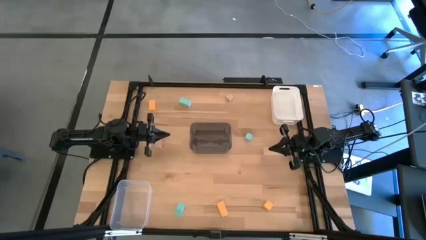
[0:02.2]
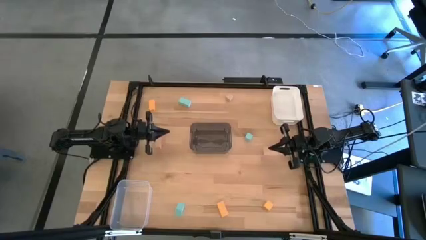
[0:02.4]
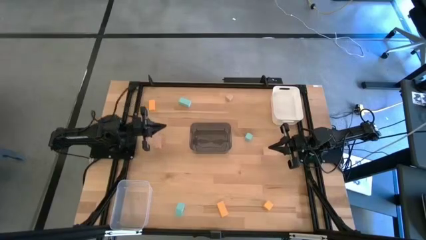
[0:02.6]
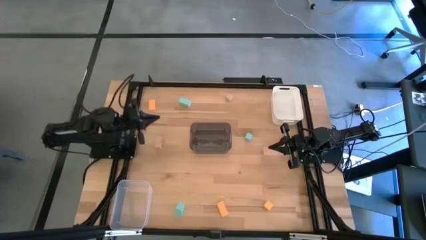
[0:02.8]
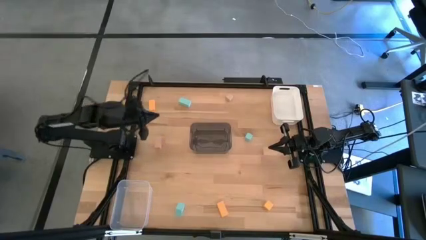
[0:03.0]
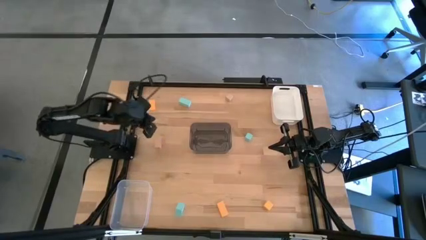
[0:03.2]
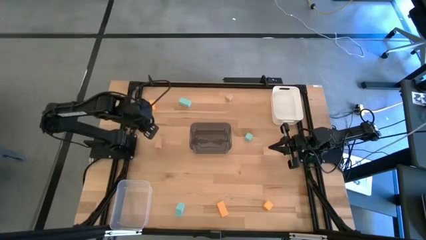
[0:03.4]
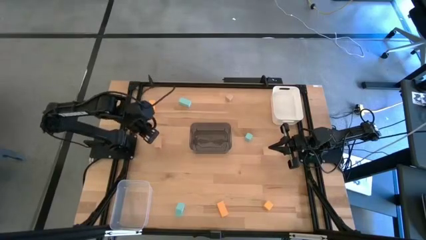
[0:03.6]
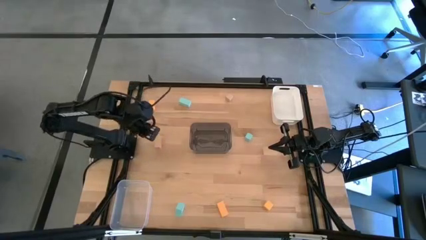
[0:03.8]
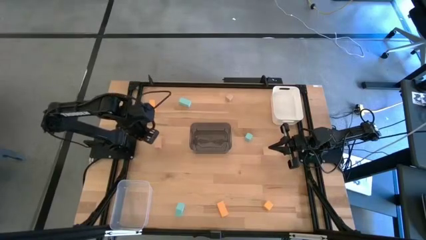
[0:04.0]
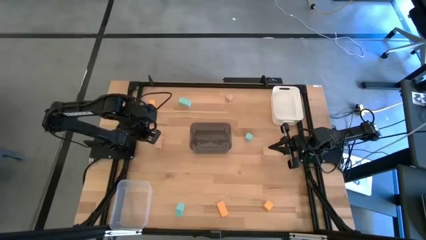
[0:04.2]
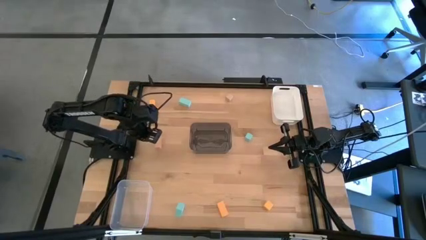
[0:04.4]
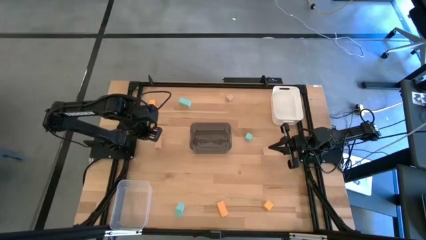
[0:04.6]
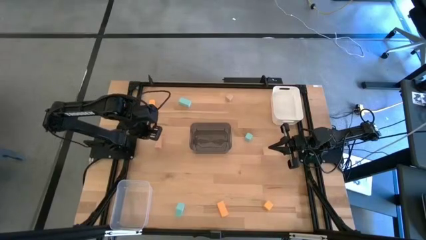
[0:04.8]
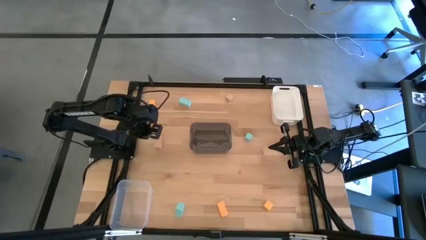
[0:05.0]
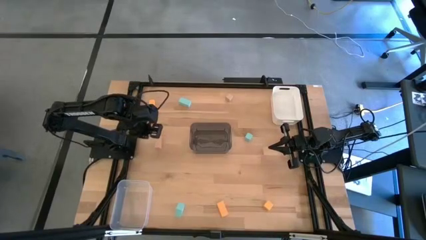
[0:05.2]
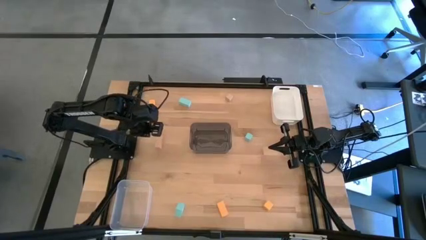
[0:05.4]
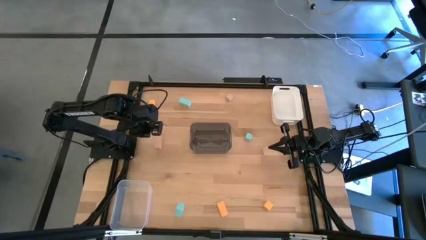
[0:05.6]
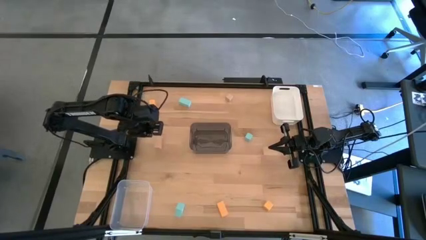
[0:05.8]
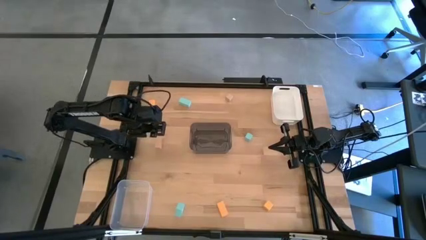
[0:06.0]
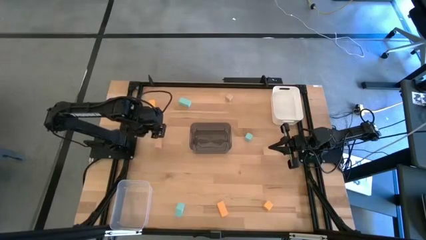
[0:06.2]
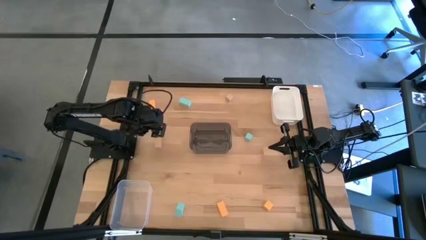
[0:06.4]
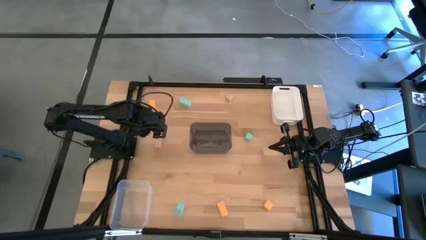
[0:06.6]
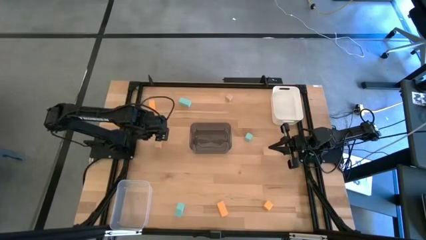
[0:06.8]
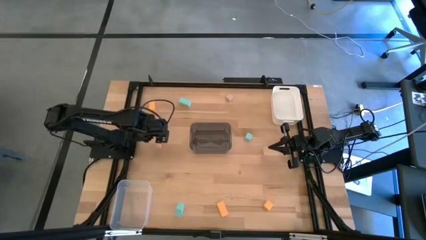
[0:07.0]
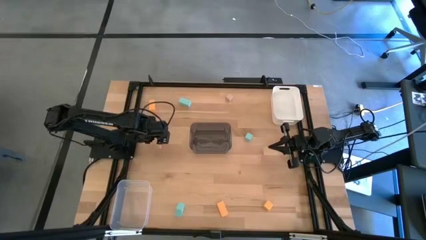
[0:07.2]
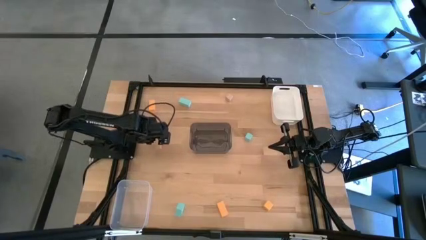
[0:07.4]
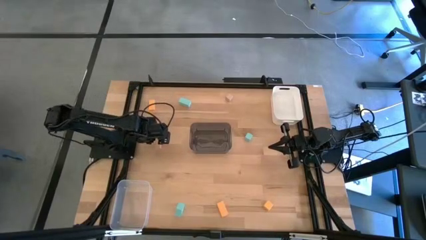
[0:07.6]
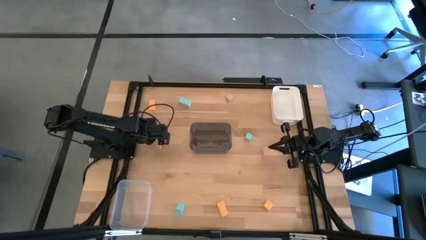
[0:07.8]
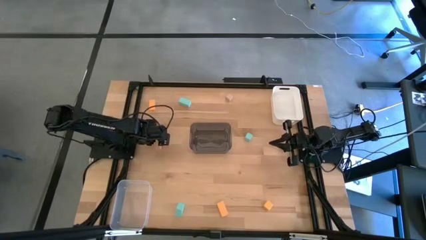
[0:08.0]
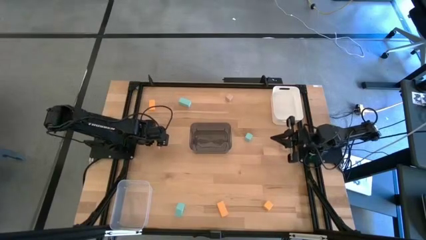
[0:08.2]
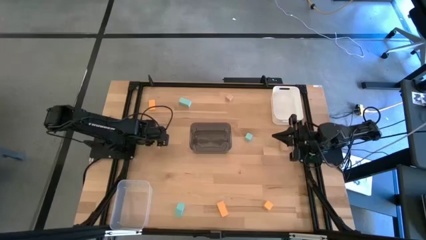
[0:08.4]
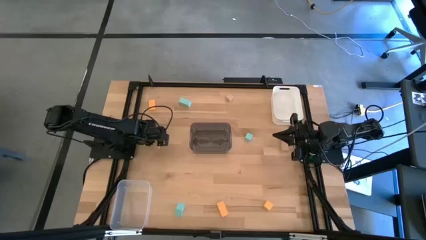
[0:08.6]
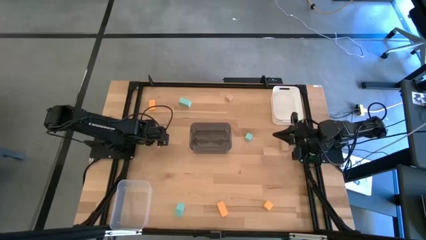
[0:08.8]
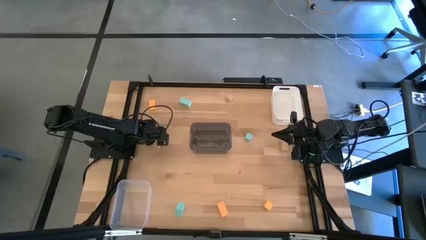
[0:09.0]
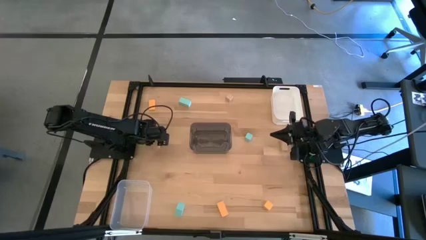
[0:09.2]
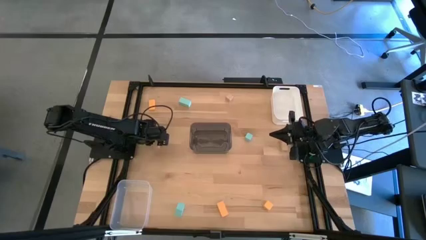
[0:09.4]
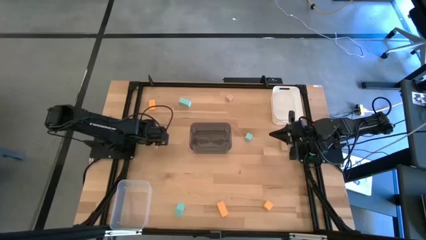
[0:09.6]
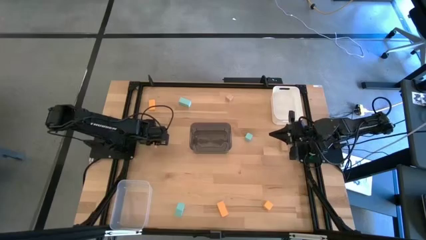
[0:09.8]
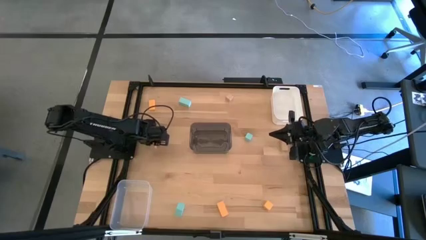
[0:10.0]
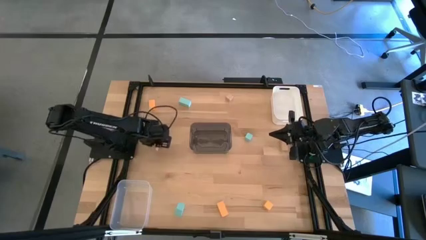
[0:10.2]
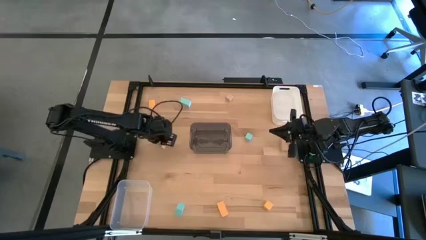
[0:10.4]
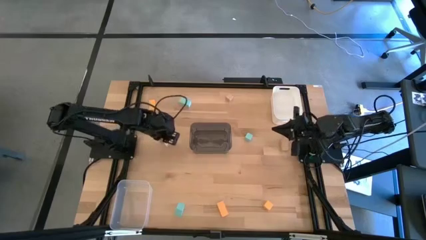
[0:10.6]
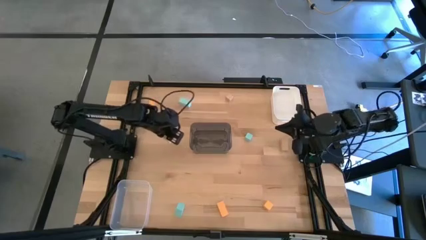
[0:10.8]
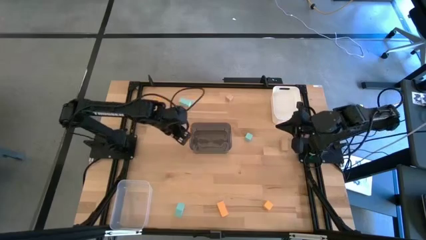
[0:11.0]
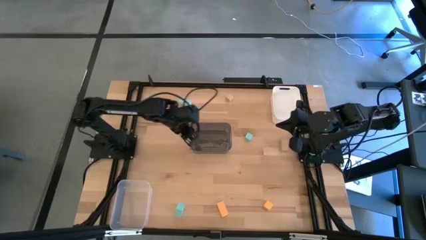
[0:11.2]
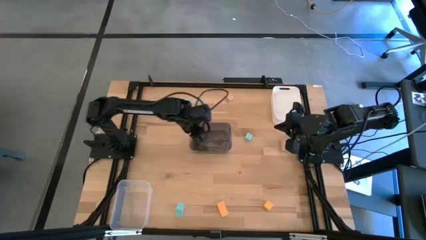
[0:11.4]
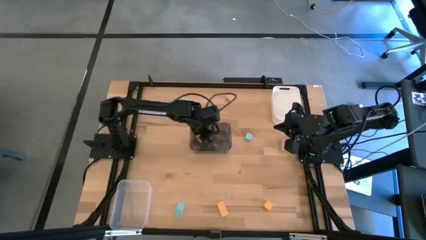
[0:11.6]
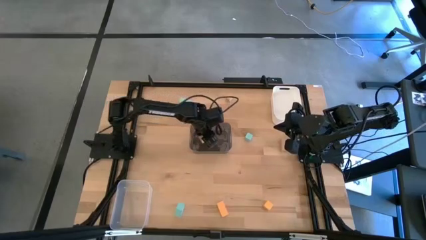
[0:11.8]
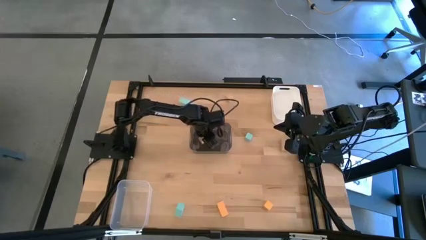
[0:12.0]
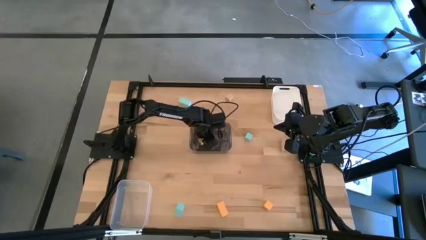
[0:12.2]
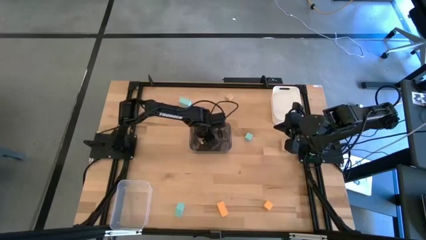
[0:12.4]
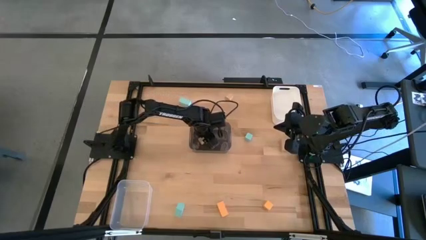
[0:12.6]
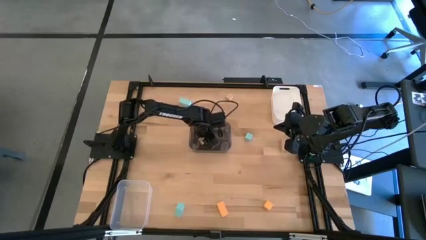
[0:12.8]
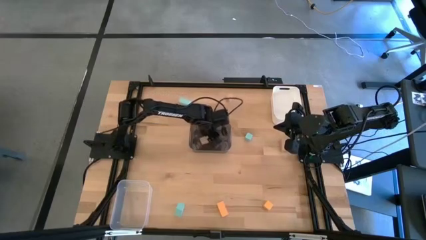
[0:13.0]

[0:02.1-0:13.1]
Task: Sort & place blocks by color
Put the left brown block into the black bin

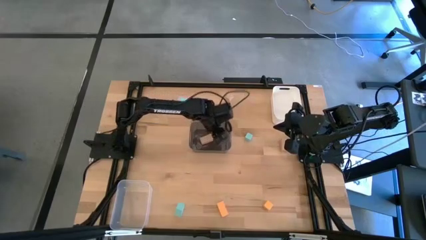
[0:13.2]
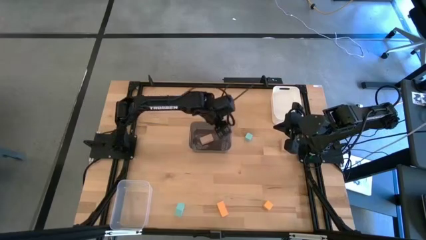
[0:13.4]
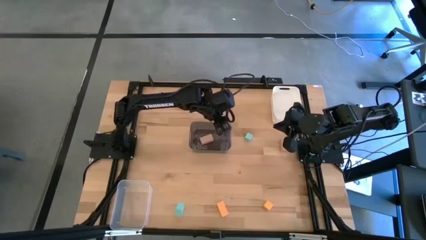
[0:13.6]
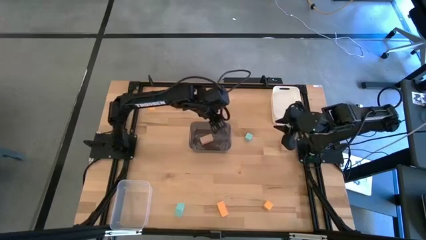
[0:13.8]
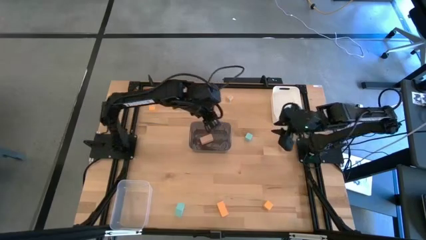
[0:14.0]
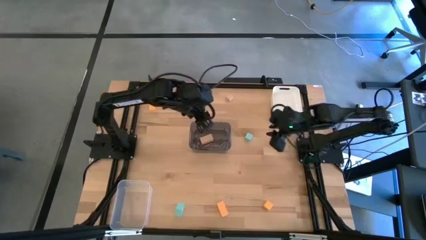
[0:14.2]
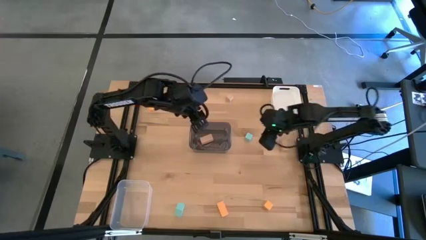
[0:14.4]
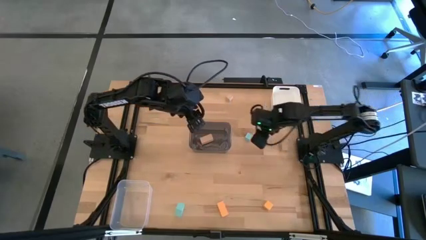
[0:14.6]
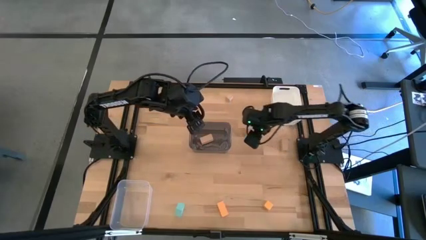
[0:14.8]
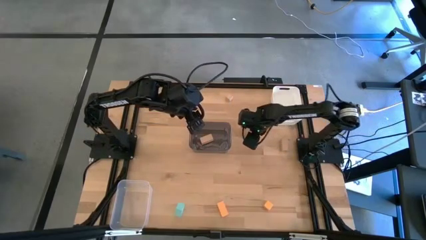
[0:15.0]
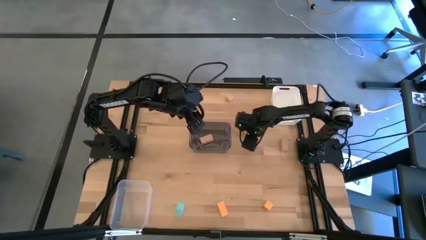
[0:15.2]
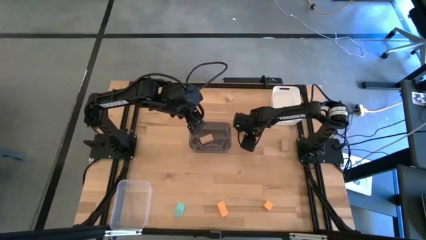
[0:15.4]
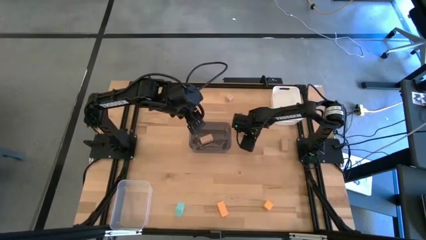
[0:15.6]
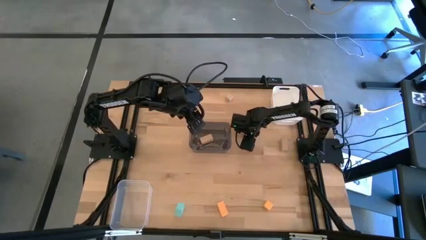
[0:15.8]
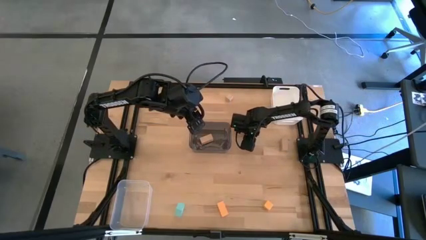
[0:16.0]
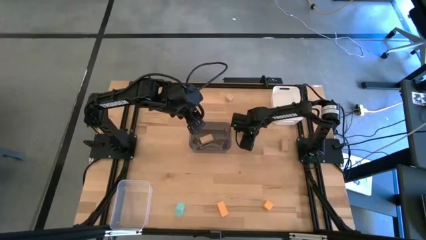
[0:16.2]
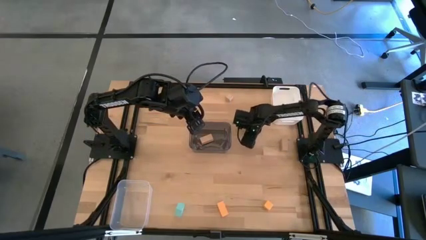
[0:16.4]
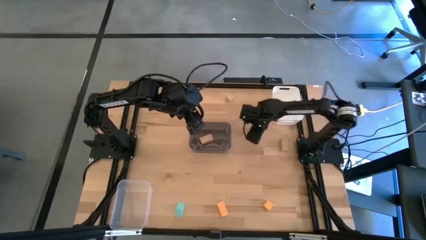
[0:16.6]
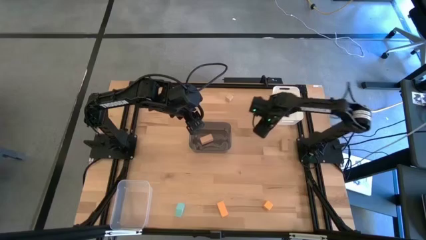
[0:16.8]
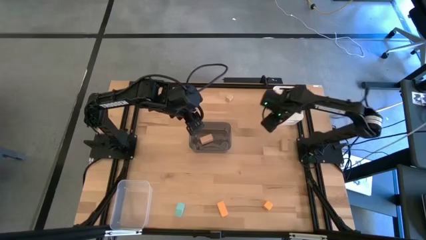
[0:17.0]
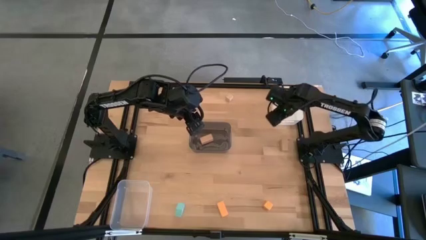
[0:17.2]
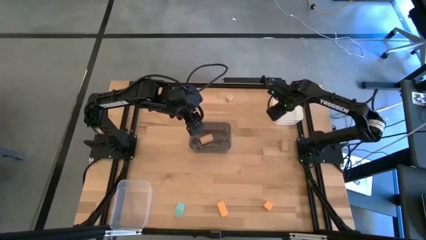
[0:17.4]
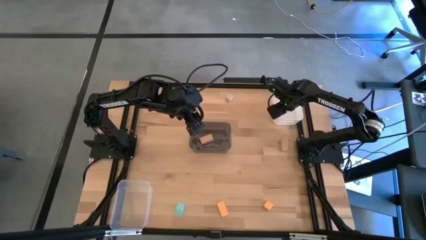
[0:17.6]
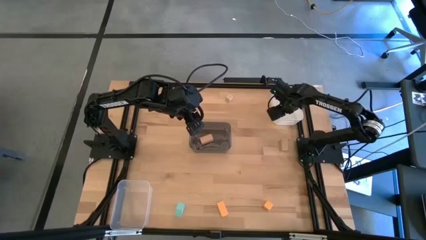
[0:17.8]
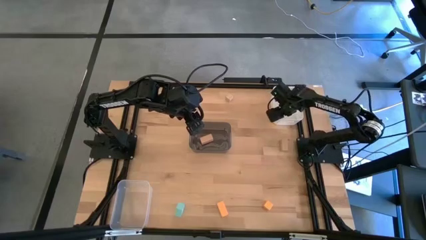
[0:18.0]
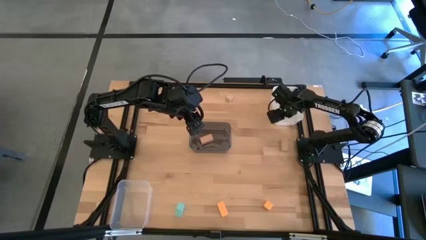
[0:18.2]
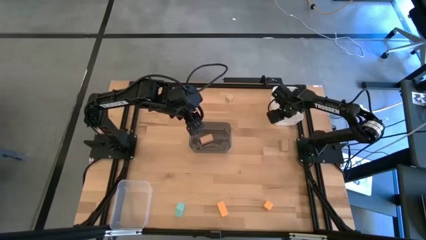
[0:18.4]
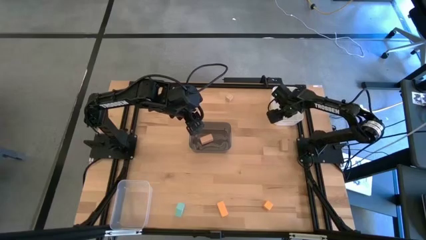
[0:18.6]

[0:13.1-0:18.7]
Put the right blue block into the white bin
